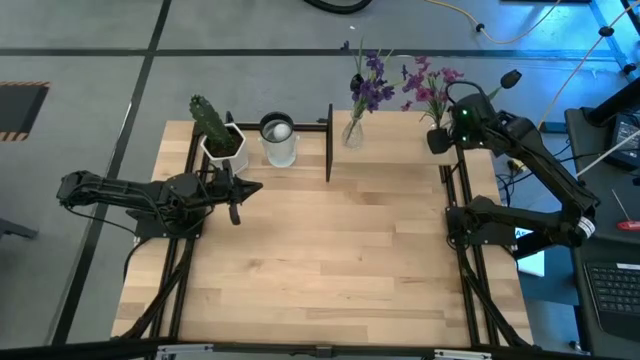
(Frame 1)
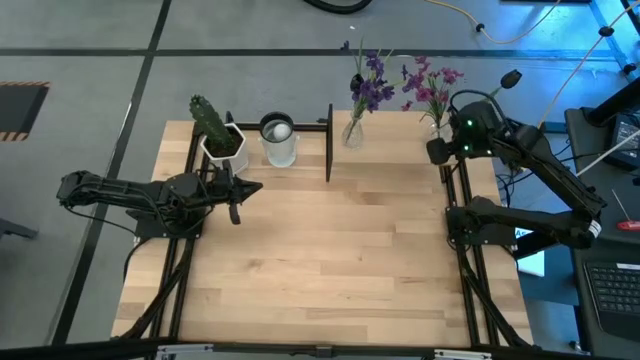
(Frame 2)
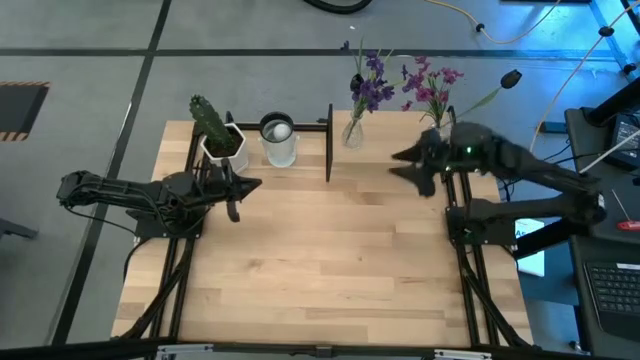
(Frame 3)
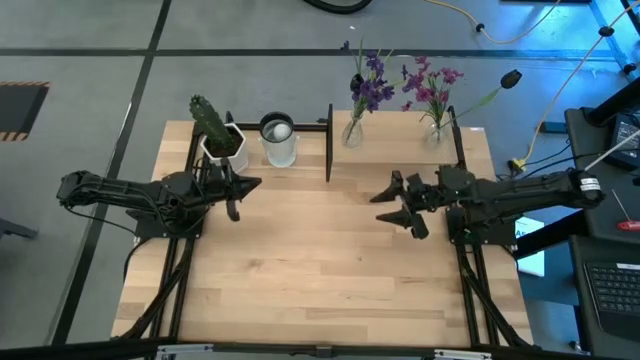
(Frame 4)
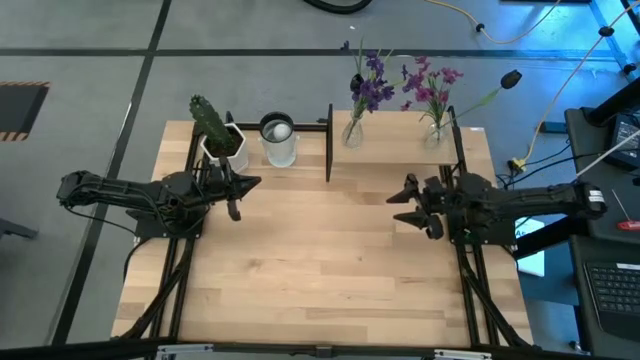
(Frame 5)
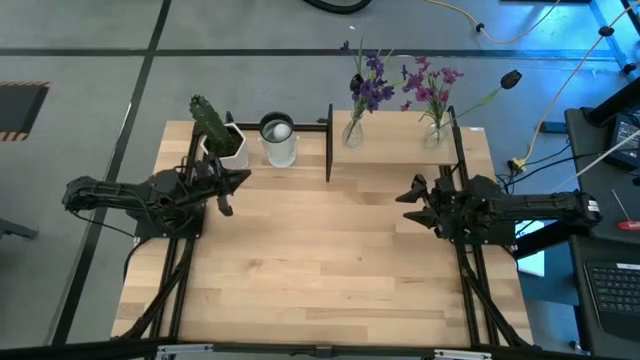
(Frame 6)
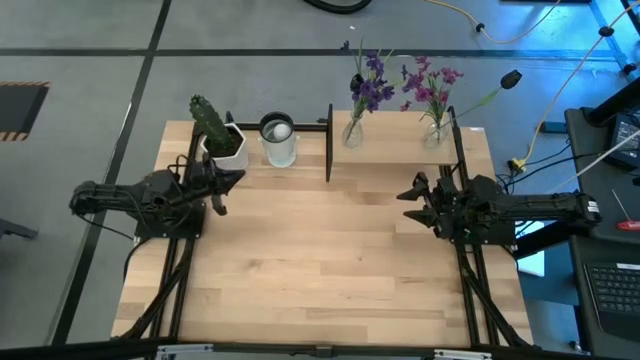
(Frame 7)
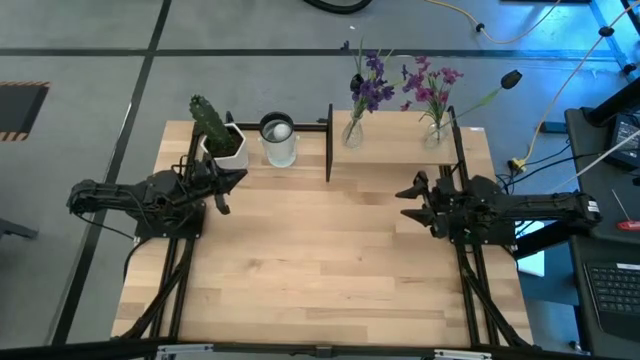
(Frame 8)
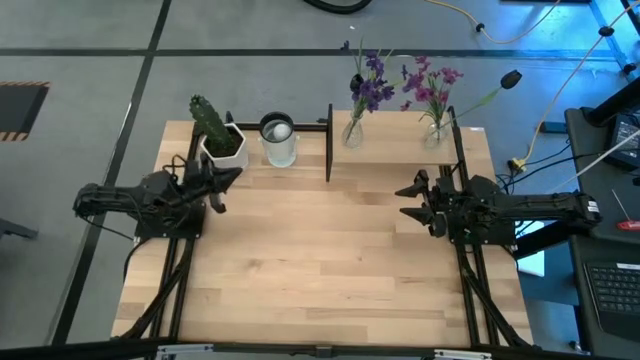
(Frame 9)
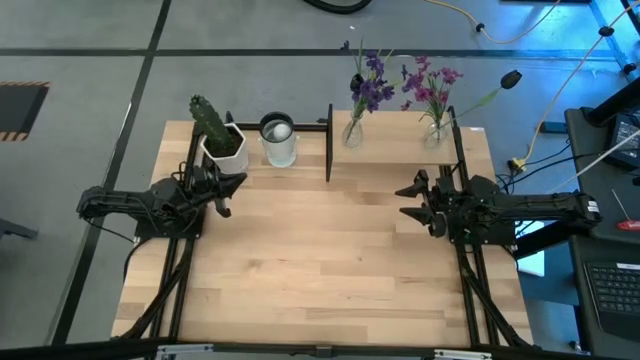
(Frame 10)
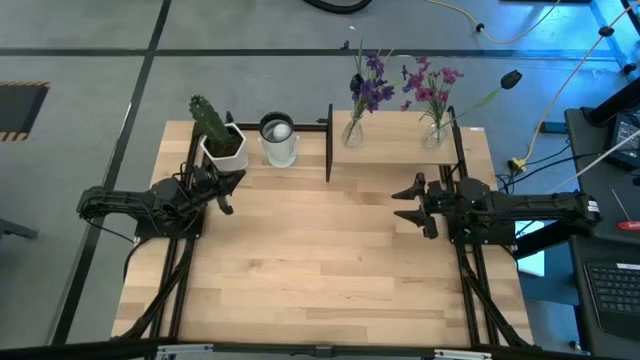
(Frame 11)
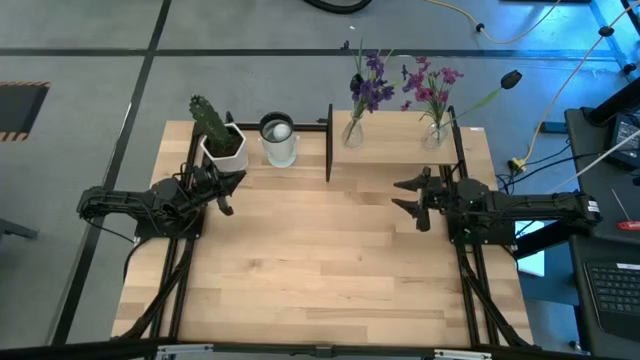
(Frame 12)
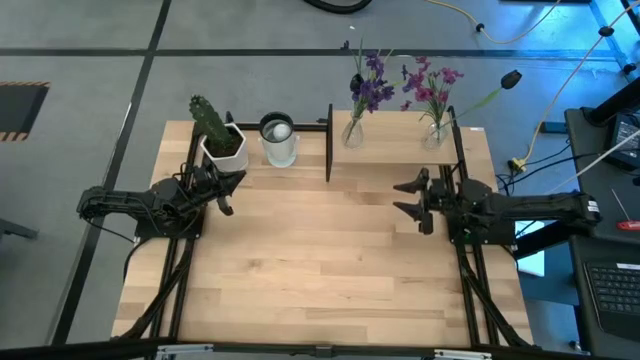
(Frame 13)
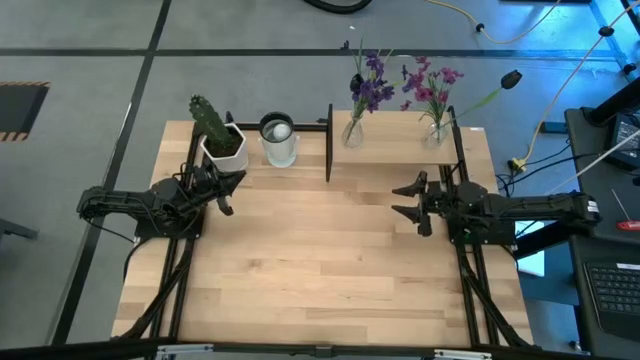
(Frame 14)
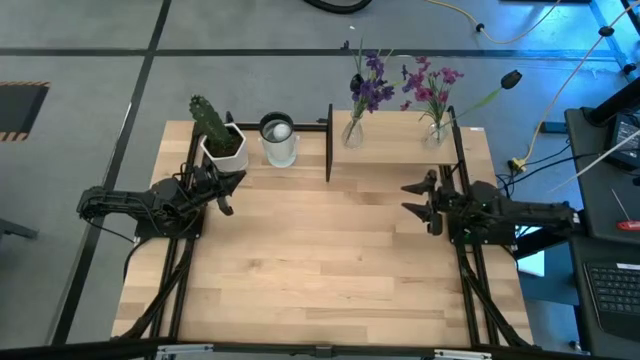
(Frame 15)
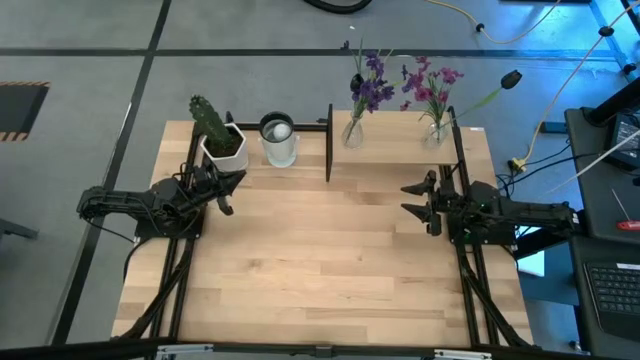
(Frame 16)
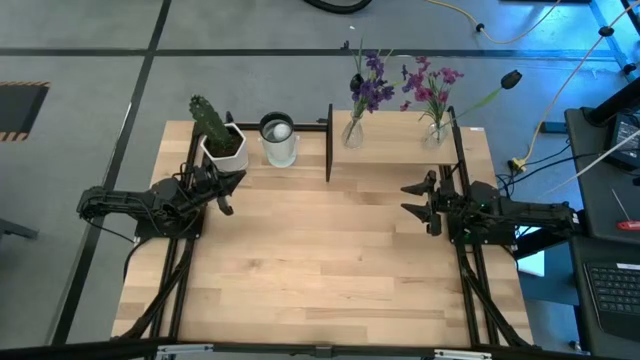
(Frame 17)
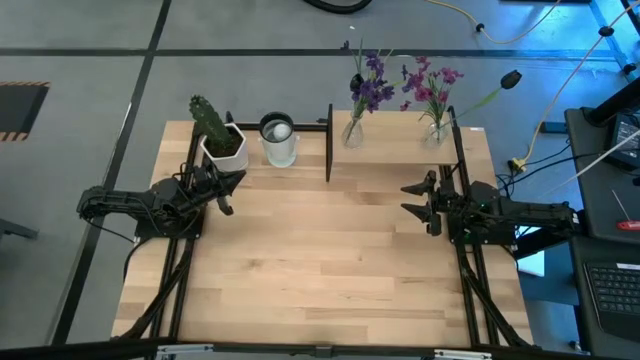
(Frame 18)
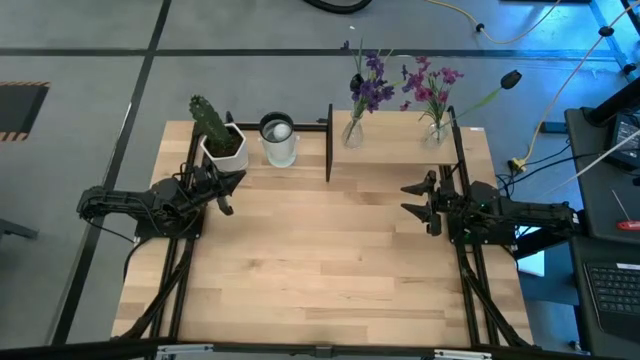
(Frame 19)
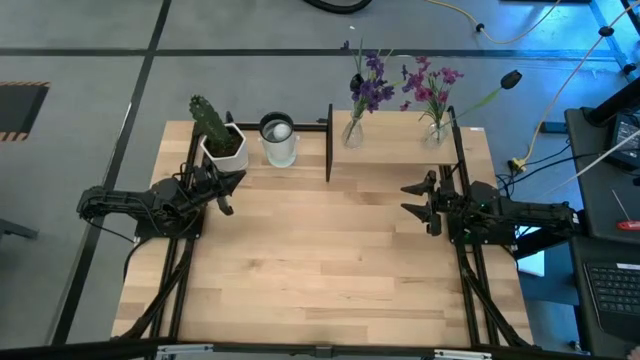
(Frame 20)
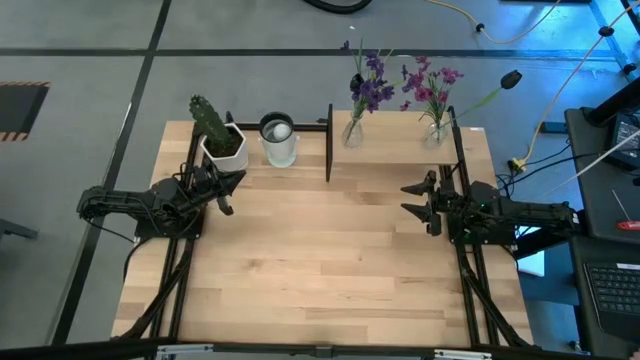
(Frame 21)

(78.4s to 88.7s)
Task: Pick and place flowers into a vace then onto a shelf
Return to Home Position

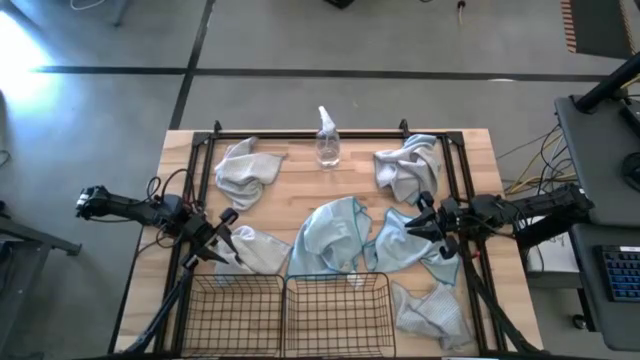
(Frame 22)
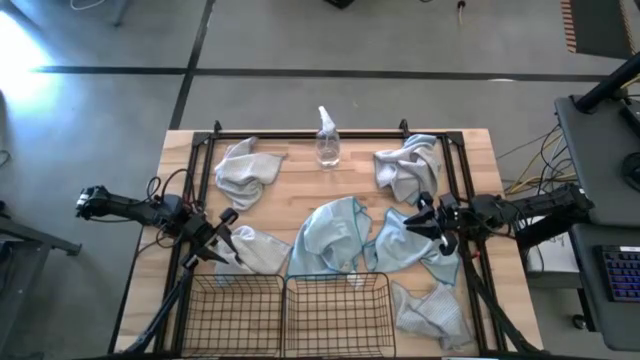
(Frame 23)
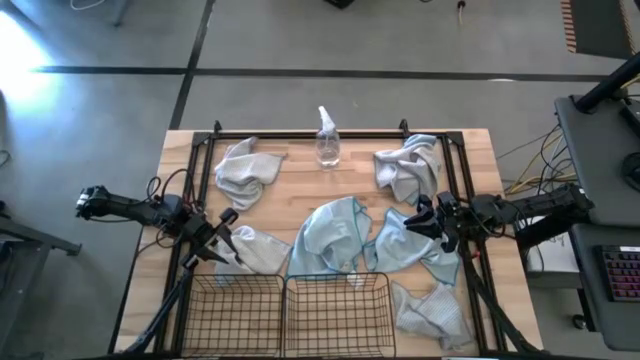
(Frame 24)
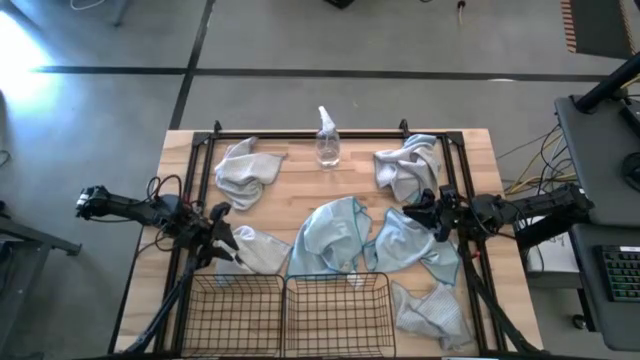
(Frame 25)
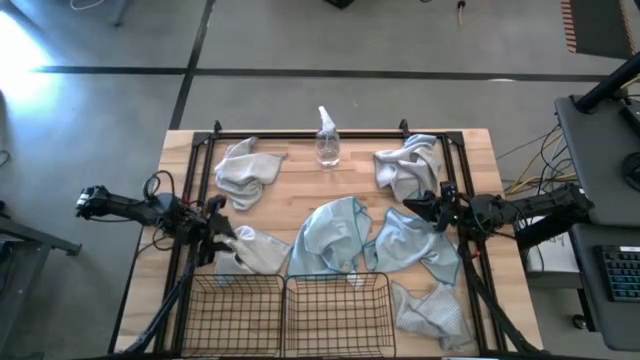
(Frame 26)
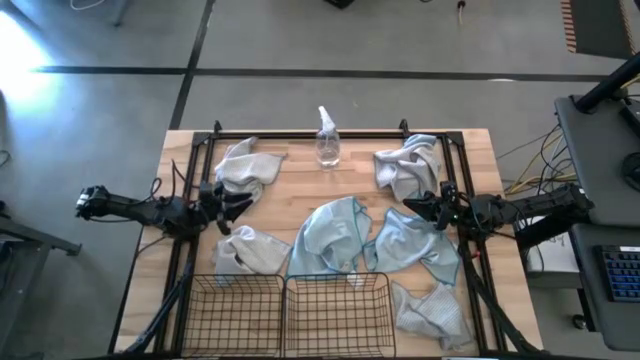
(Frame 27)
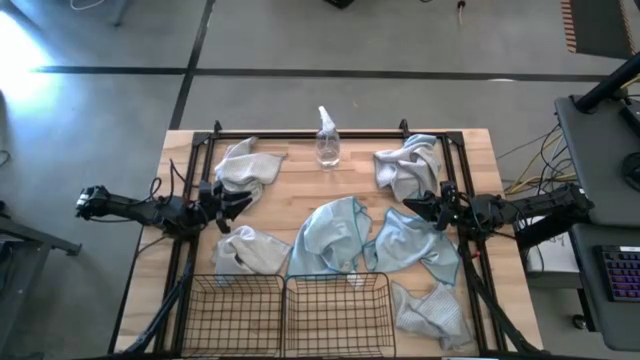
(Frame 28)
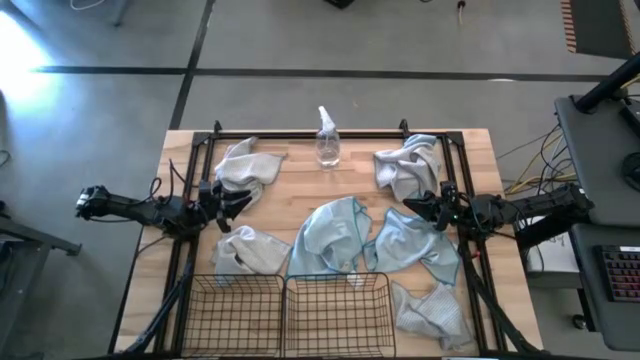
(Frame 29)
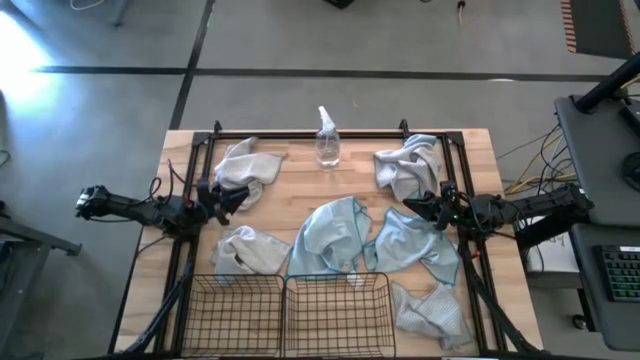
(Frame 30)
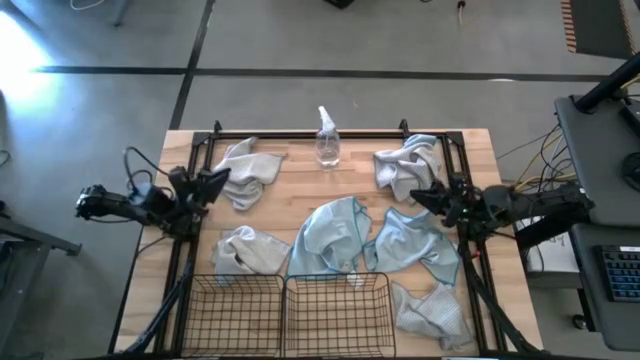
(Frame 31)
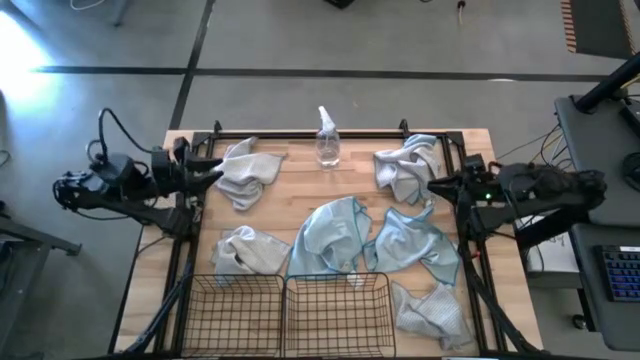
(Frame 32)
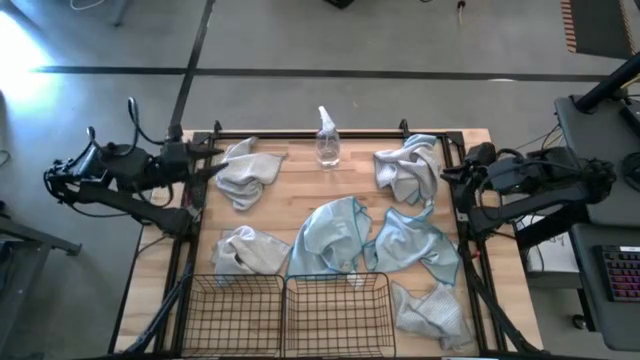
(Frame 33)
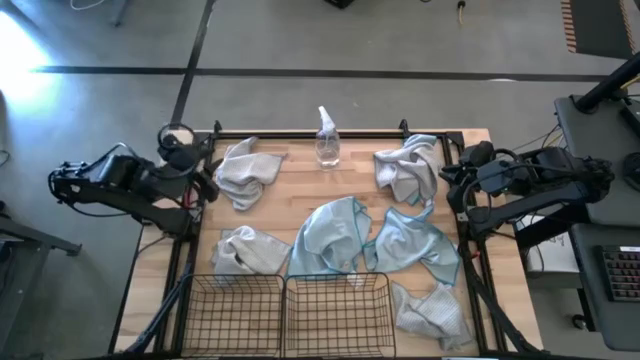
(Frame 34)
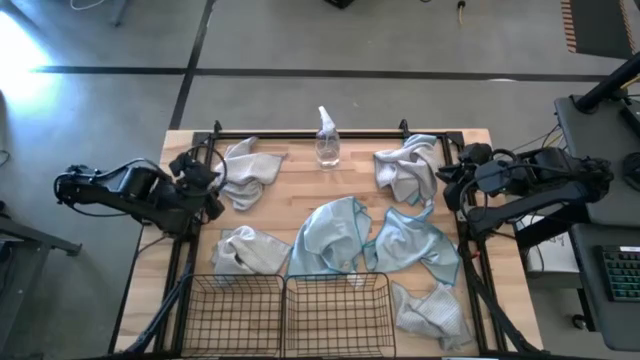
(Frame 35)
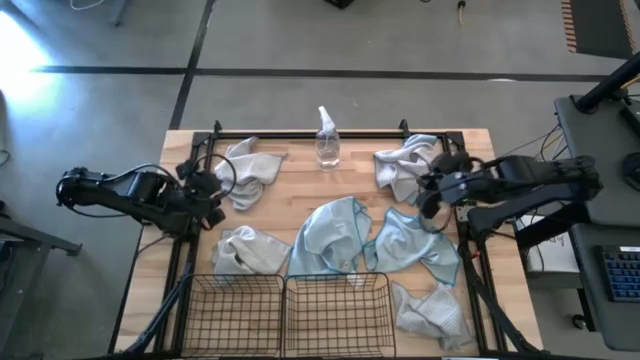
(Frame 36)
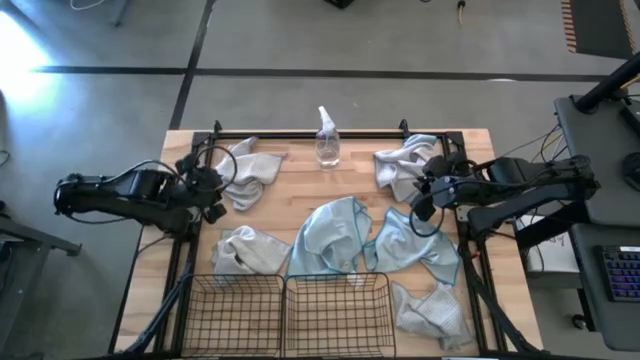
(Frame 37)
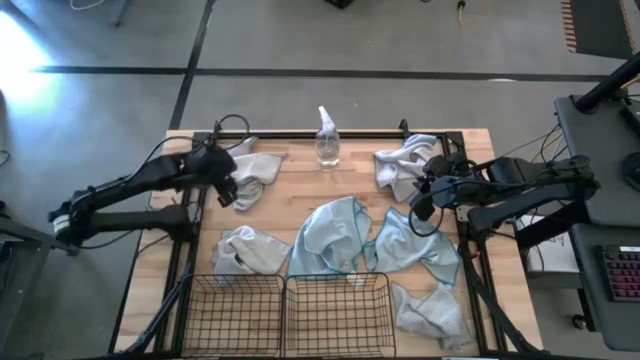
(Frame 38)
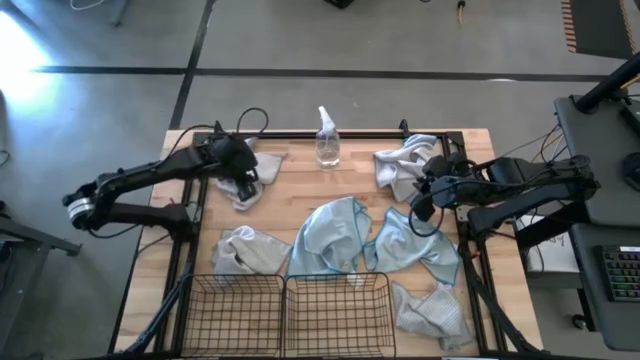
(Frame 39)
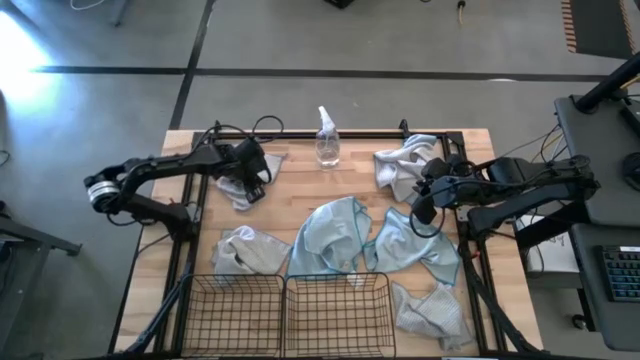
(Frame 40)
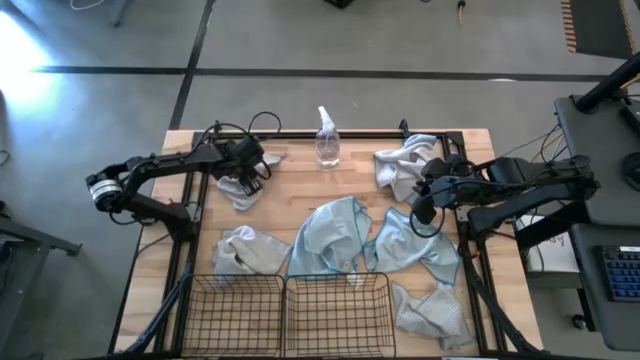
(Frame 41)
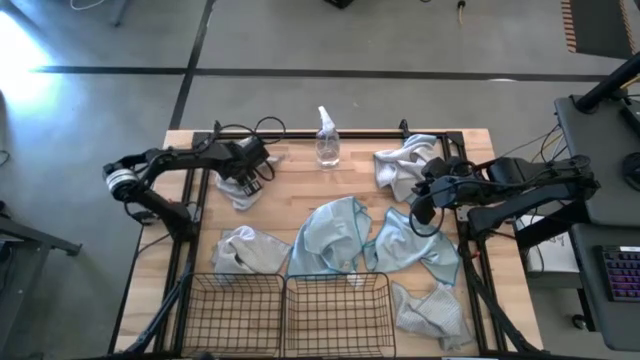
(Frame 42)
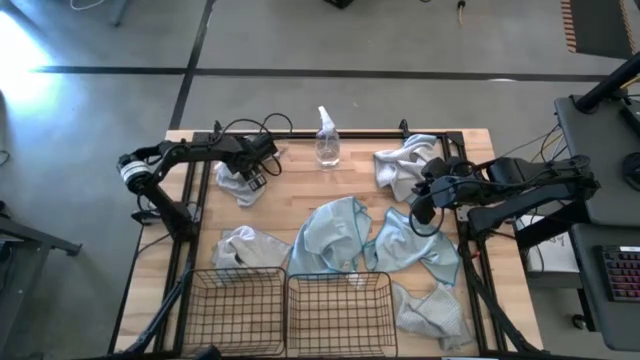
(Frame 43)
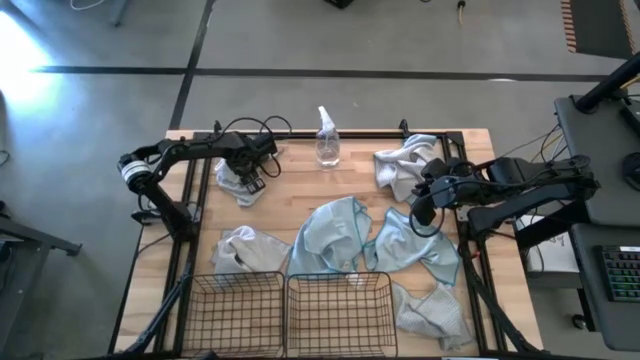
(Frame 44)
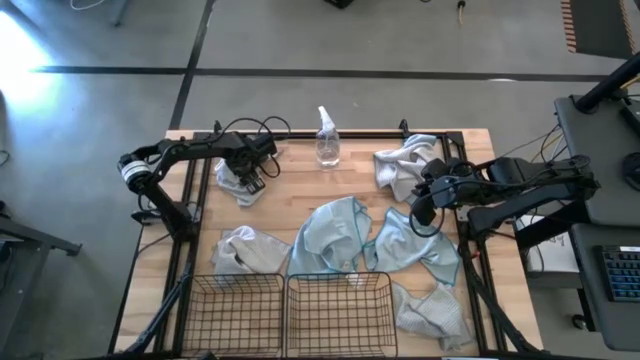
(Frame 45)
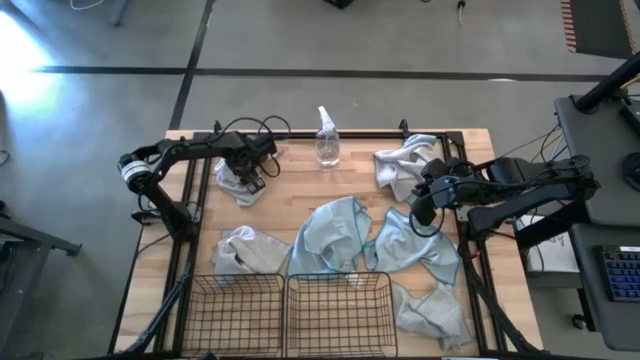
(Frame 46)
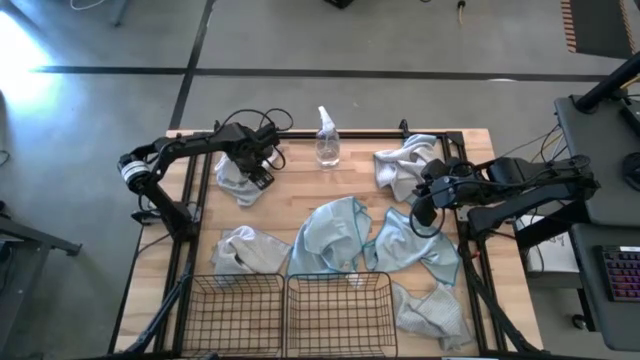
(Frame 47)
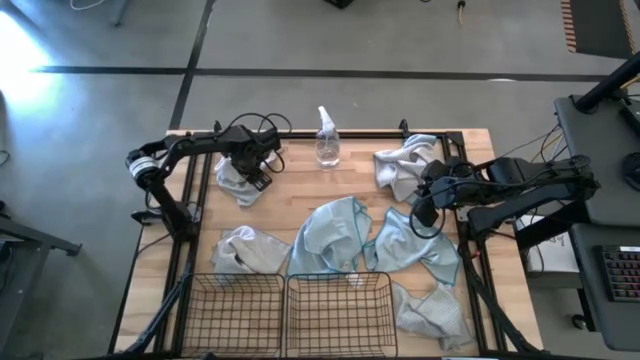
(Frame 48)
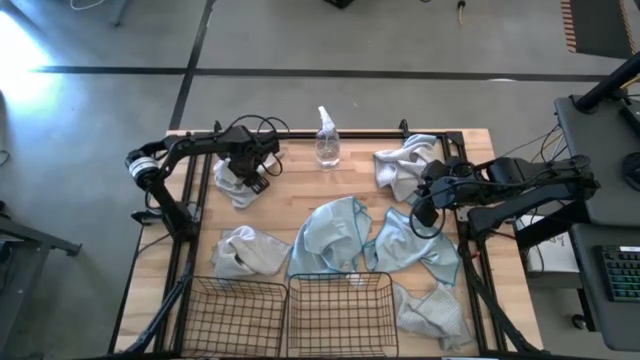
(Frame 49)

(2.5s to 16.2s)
Task: Sort microfiber towel by color & place in baskets
Put the top left gray microfiber towel into the left black wire basket
